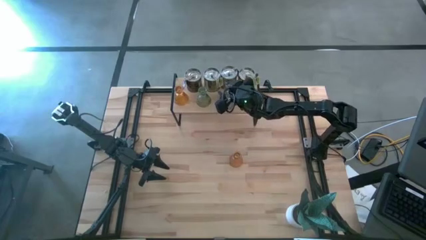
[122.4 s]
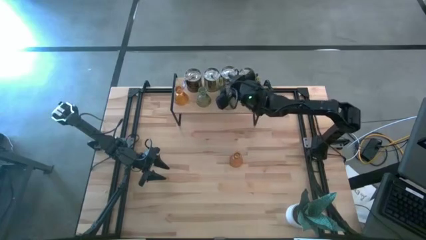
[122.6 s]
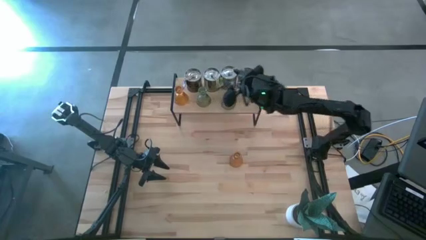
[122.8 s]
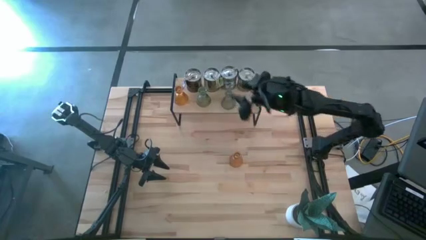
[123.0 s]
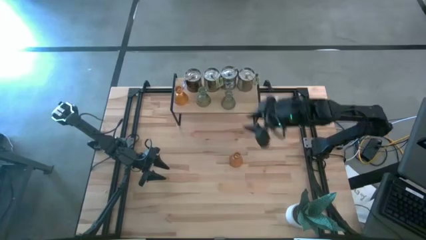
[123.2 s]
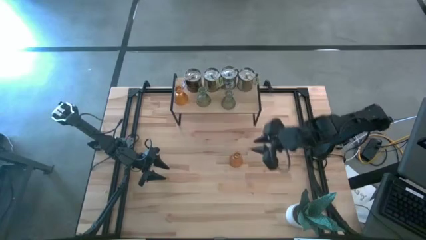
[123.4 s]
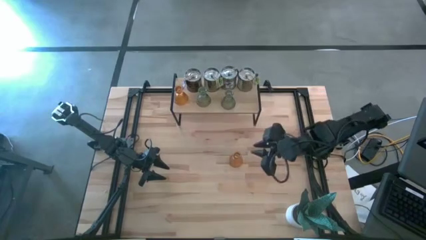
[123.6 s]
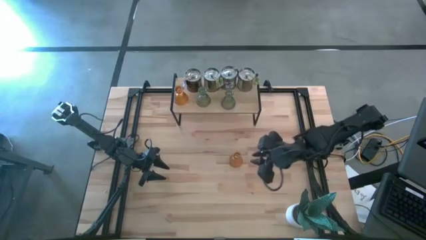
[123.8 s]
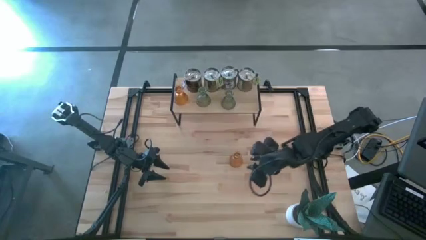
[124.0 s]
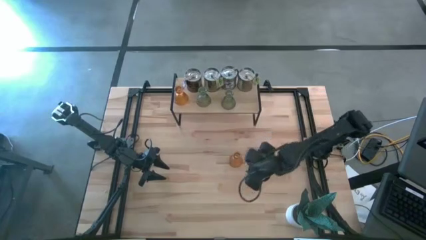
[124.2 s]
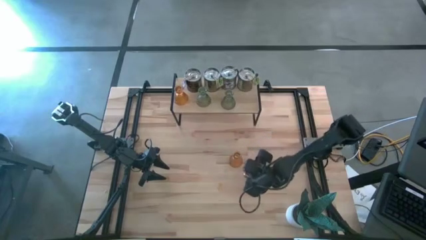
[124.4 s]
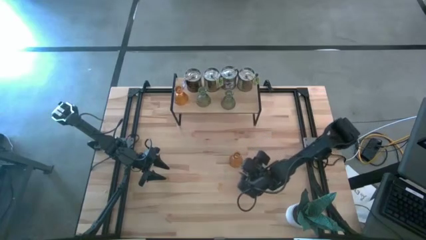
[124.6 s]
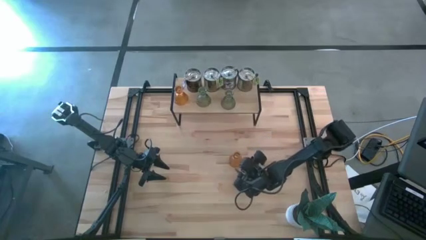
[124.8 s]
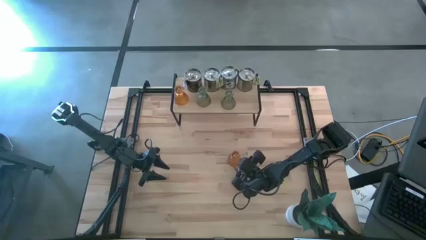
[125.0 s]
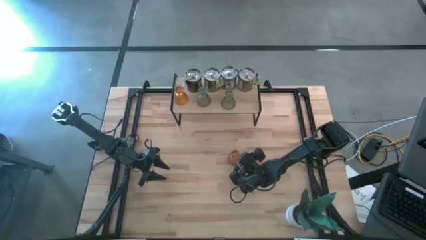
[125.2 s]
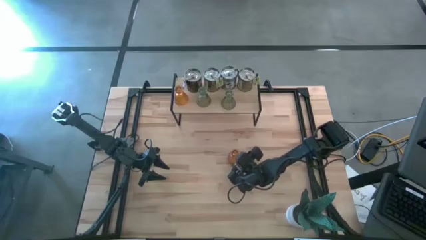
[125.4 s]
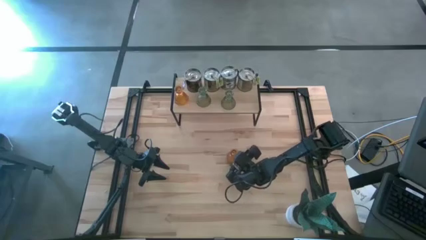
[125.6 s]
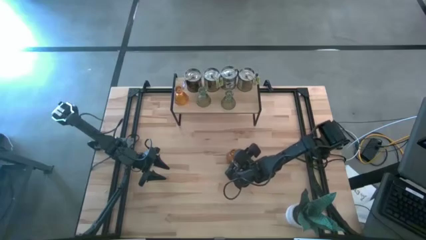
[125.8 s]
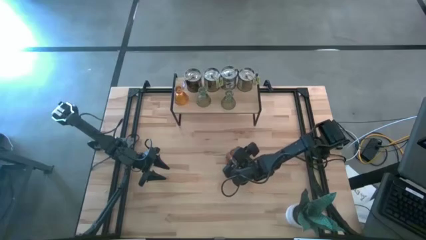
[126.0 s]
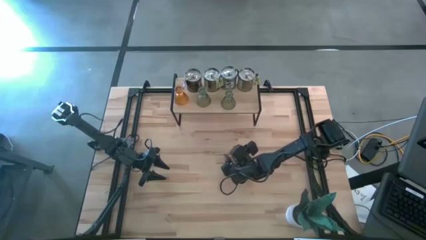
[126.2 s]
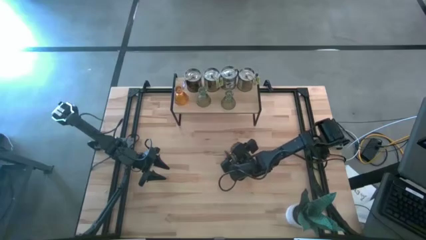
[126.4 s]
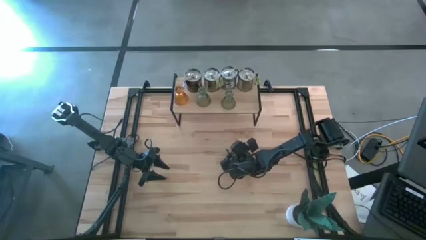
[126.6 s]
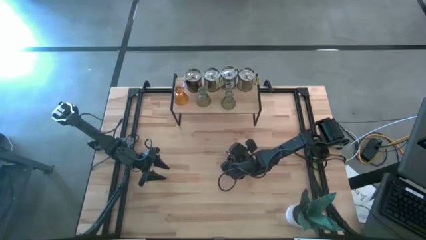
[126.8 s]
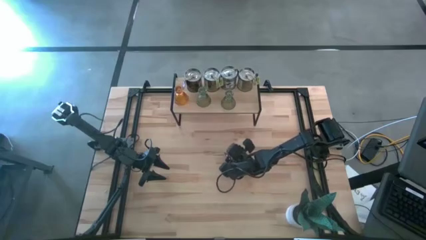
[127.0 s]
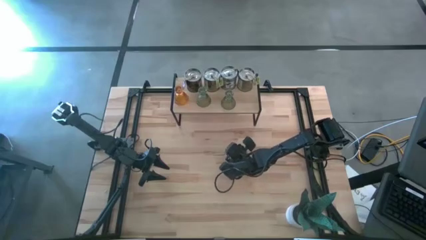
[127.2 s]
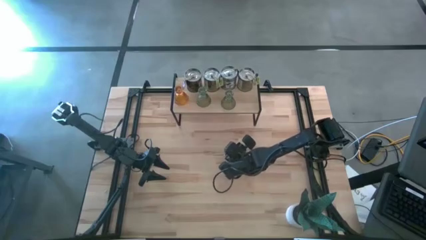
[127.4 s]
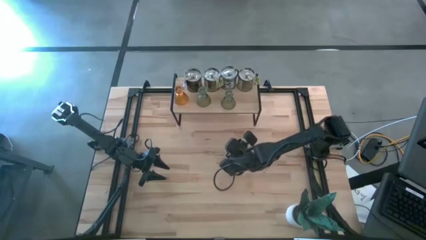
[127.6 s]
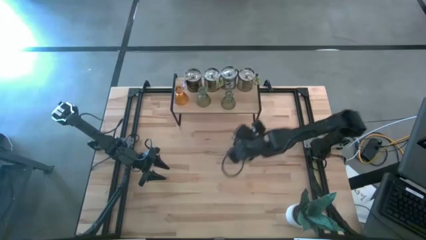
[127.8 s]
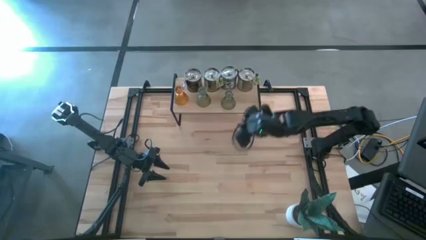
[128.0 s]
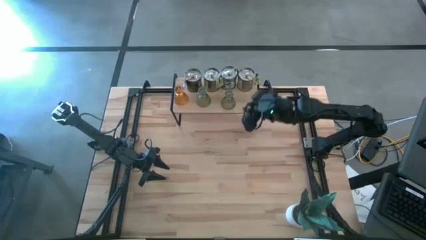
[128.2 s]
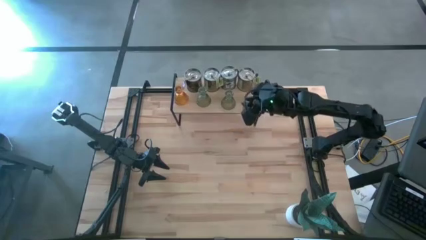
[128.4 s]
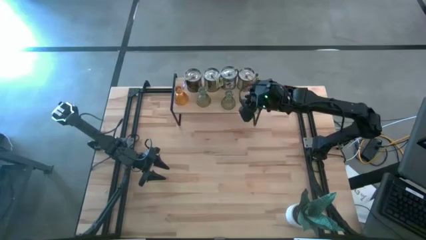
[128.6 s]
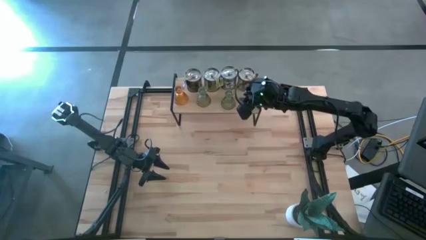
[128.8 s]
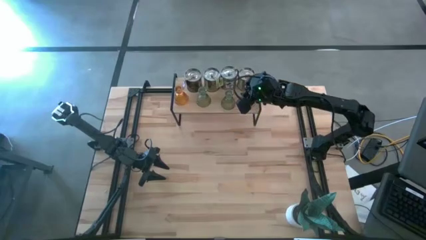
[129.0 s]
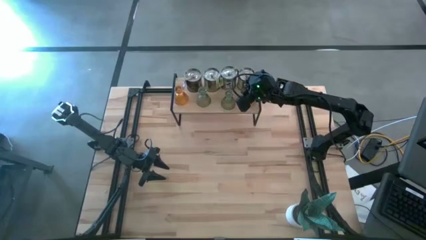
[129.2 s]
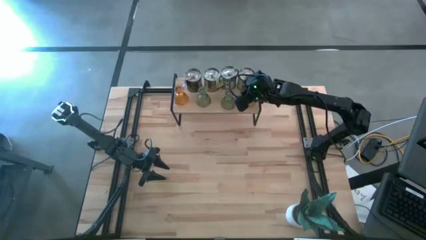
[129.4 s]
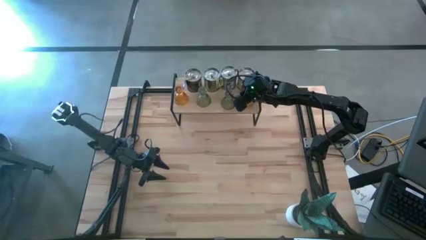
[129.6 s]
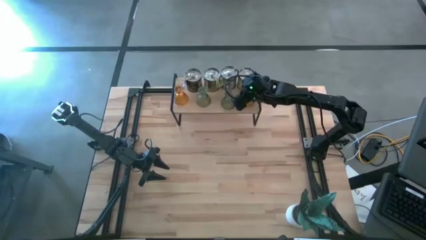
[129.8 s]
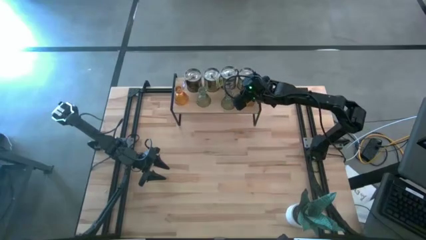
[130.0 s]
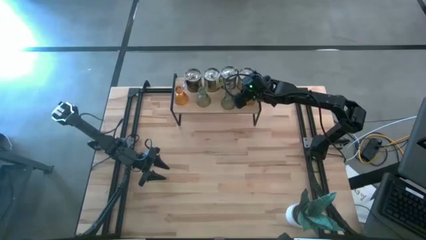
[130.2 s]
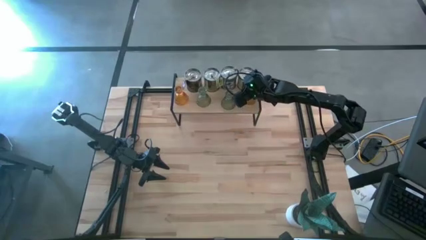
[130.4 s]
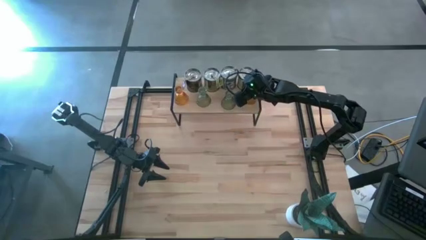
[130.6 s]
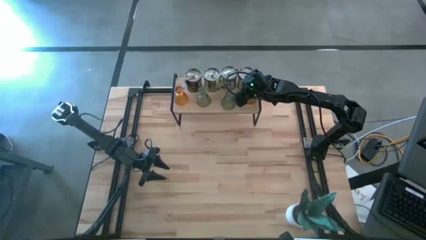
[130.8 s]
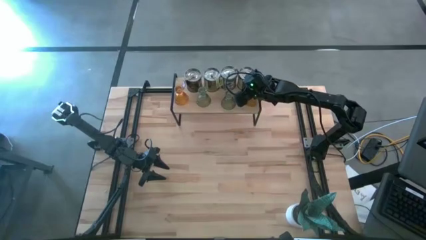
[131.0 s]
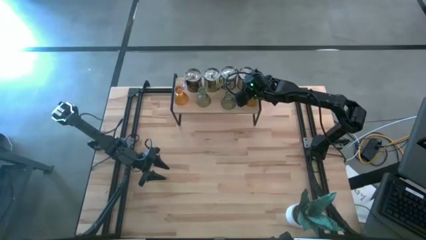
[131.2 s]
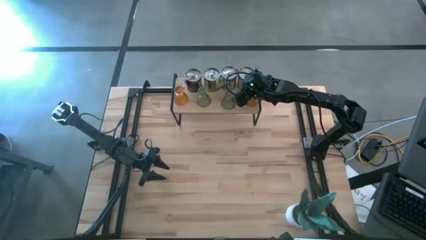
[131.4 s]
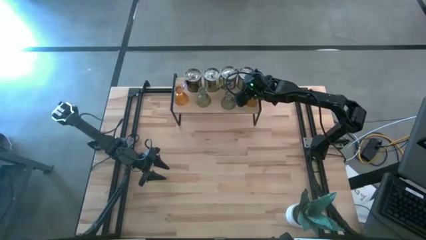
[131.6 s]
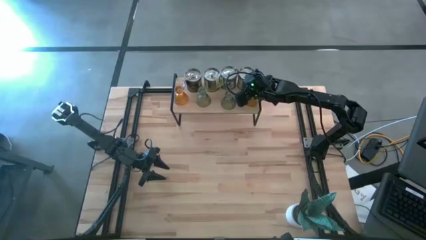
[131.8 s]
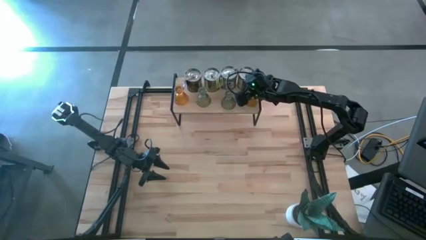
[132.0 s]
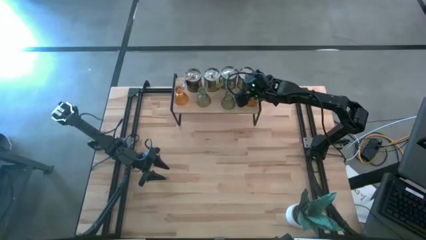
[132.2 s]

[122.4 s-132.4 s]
Task: Pick & Place candle stick holders
Put the orange glass candle holder on the shelf

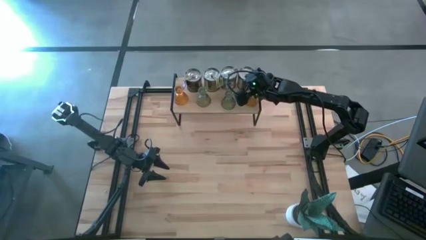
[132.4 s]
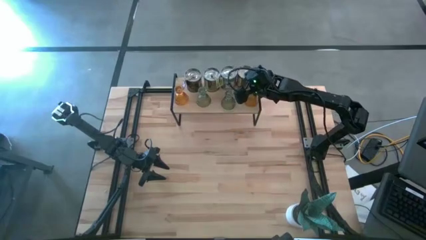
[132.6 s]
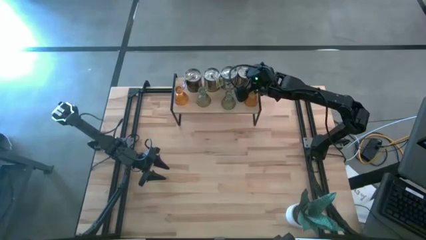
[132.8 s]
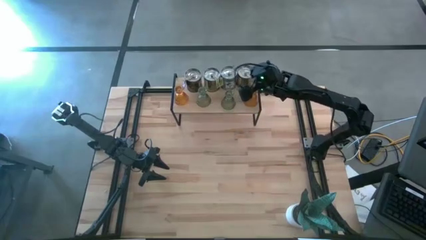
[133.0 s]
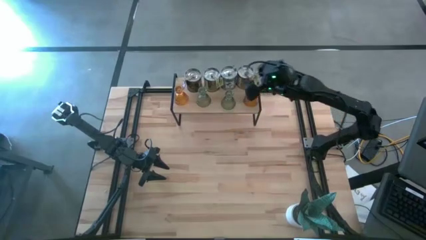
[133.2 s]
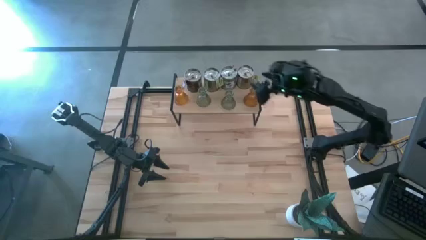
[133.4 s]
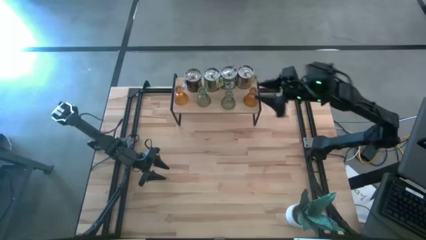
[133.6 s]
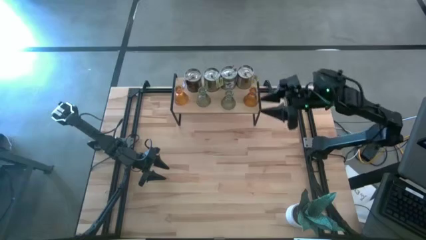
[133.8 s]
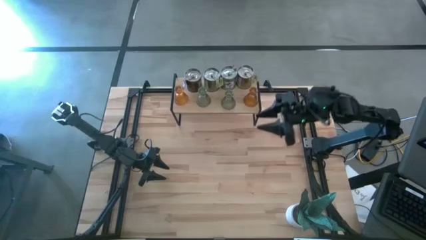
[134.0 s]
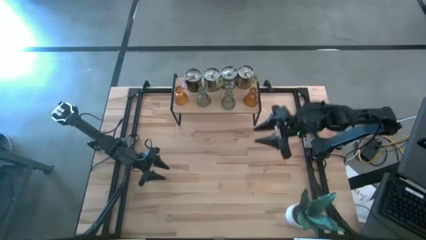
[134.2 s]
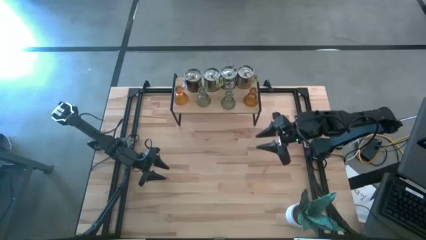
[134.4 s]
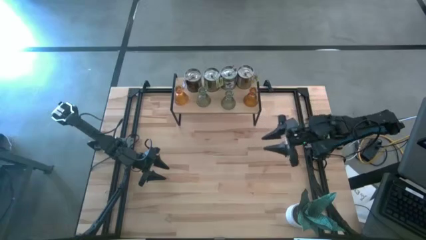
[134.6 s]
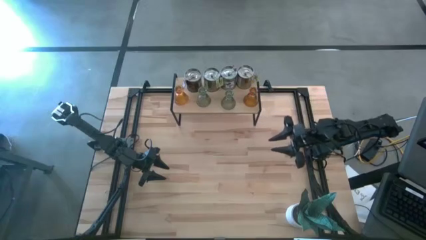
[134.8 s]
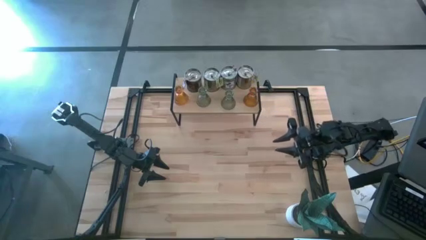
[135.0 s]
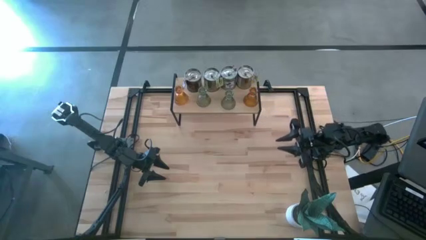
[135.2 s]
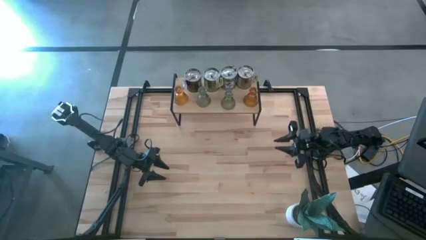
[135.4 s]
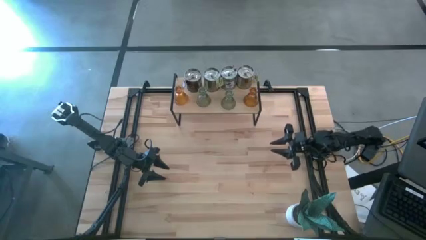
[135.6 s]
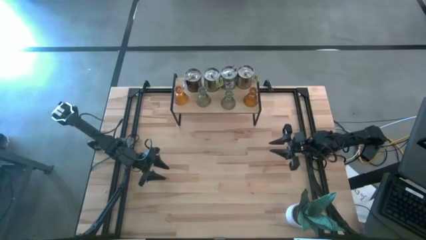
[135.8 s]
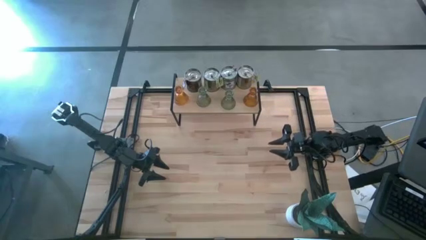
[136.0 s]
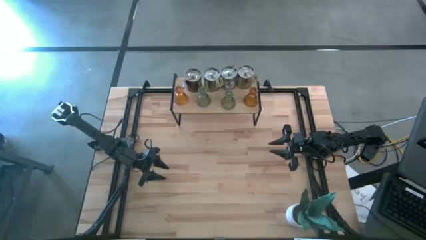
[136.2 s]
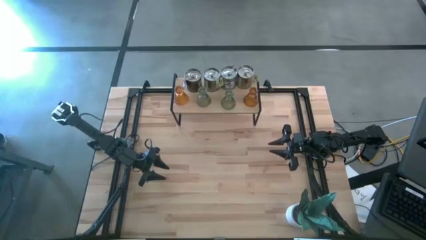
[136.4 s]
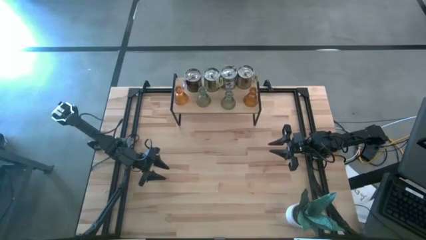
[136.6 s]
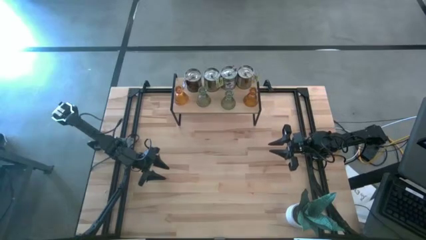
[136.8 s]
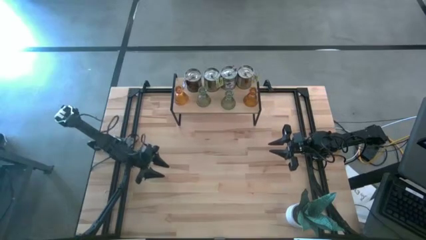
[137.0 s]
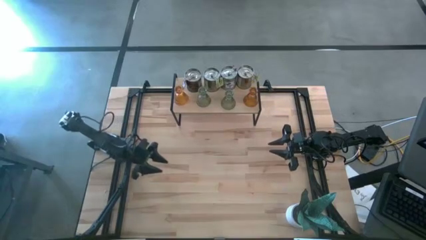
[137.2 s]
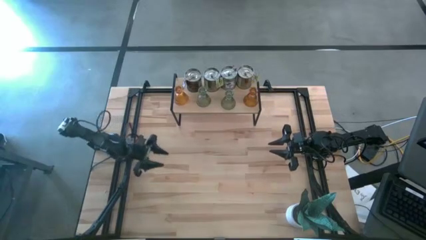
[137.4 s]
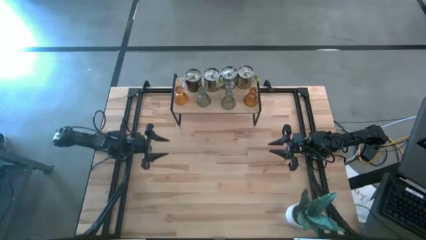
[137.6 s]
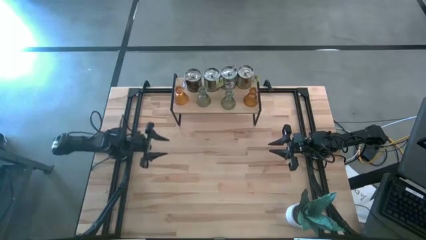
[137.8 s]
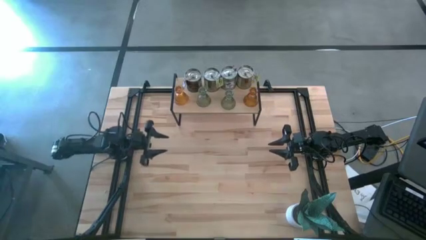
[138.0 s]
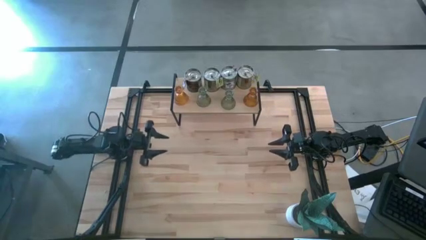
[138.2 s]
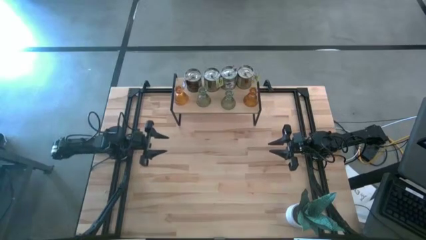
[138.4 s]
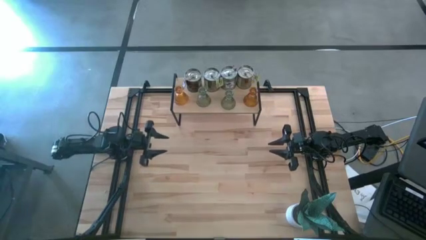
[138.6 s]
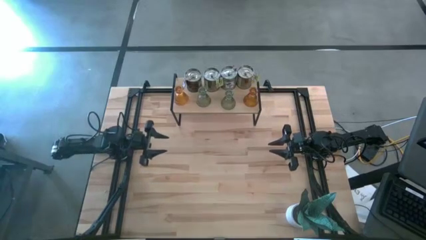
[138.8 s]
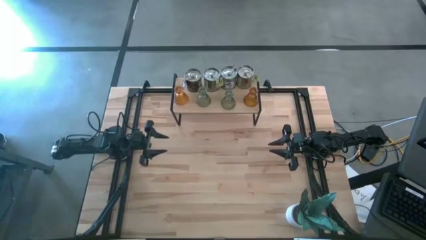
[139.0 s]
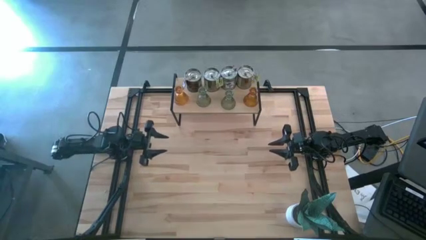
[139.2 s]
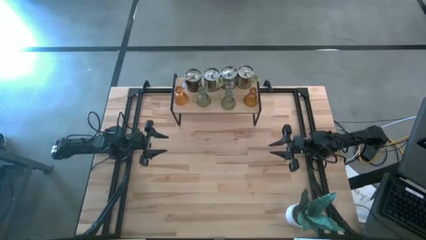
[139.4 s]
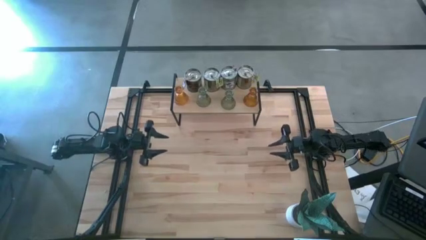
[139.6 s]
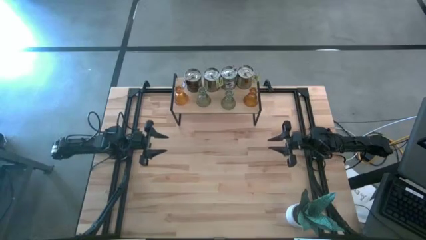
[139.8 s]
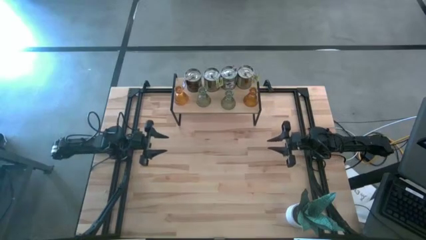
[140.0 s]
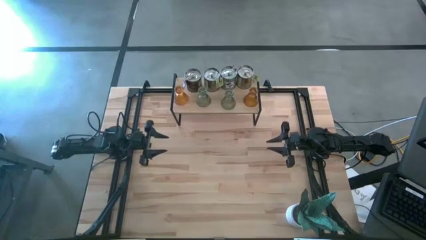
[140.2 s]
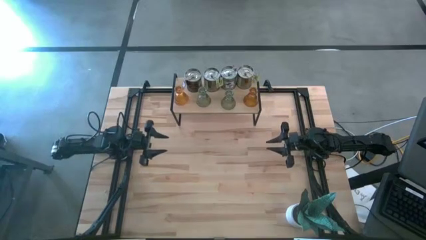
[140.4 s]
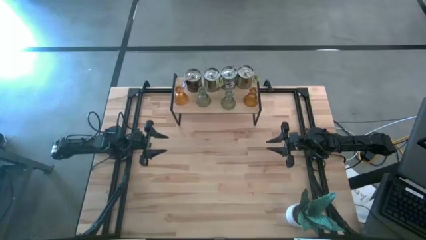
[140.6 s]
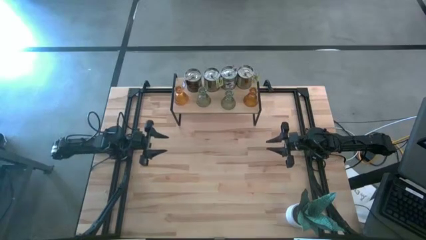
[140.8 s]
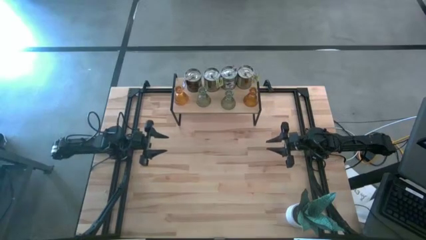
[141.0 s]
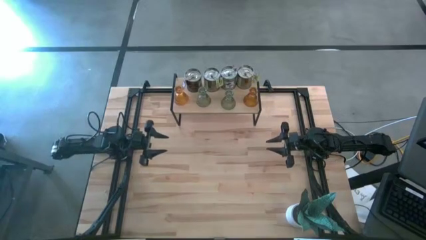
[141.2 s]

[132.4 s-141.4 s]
Return to Home Position
